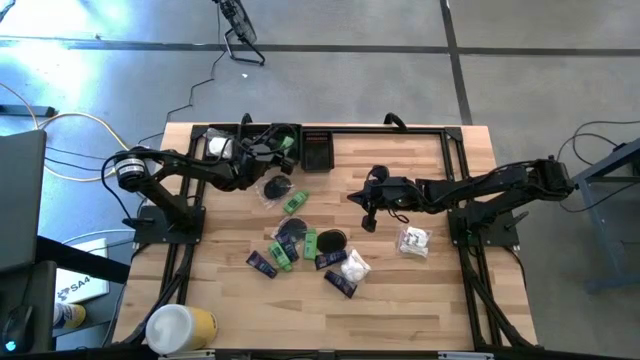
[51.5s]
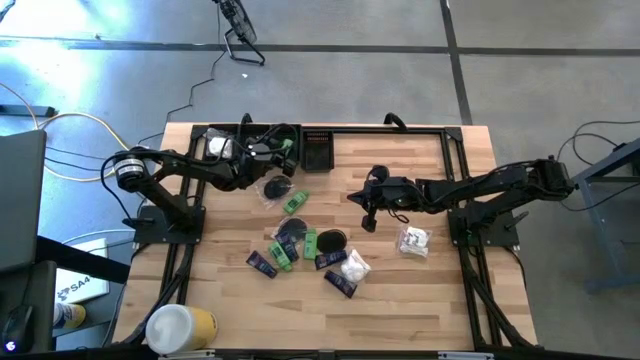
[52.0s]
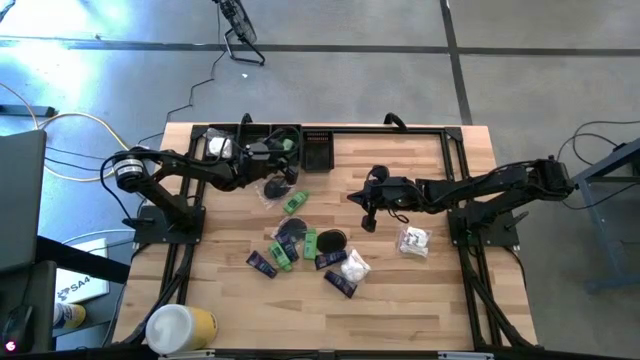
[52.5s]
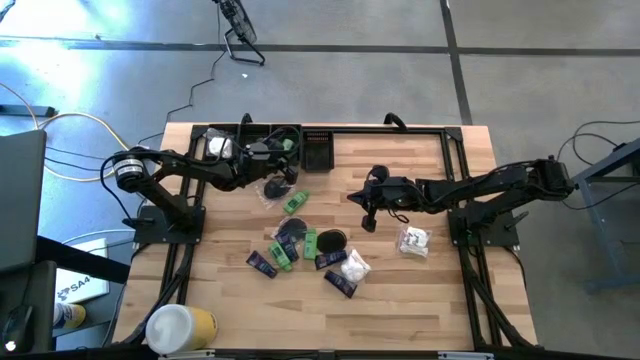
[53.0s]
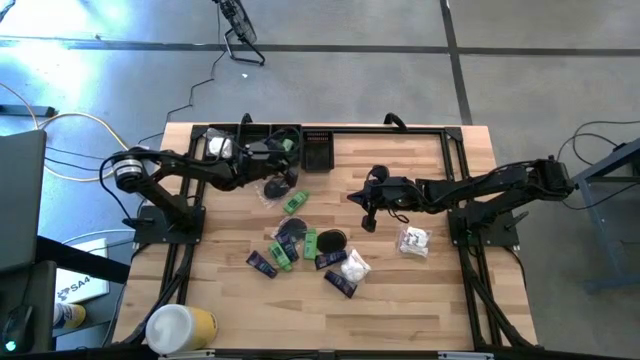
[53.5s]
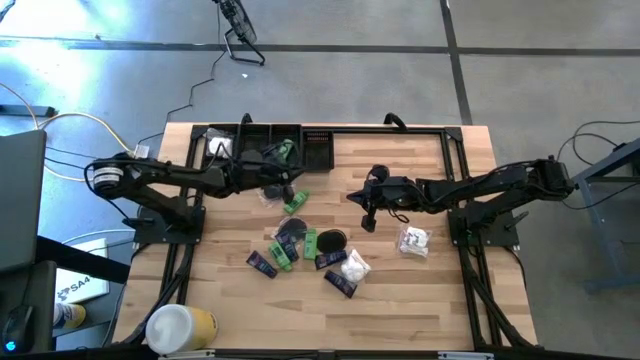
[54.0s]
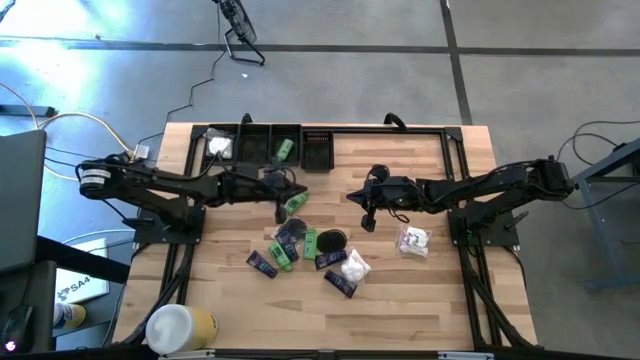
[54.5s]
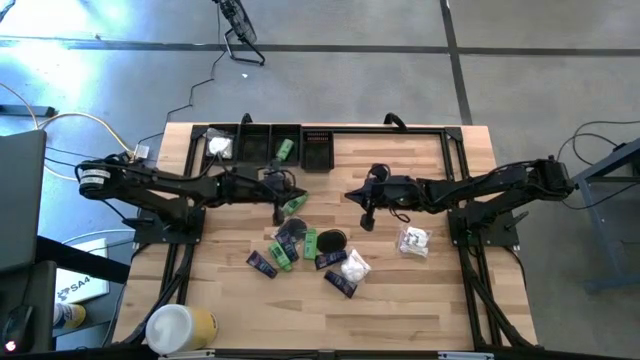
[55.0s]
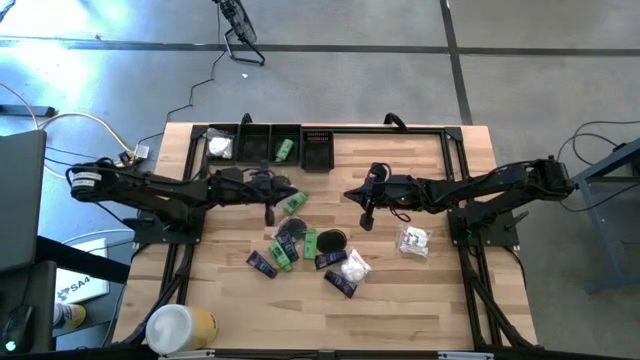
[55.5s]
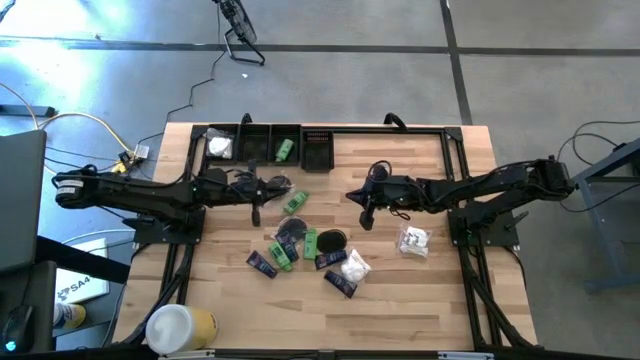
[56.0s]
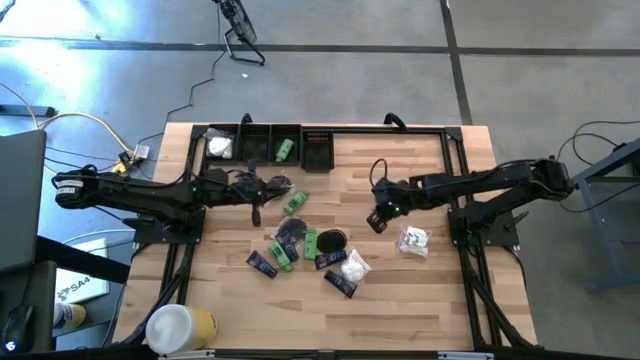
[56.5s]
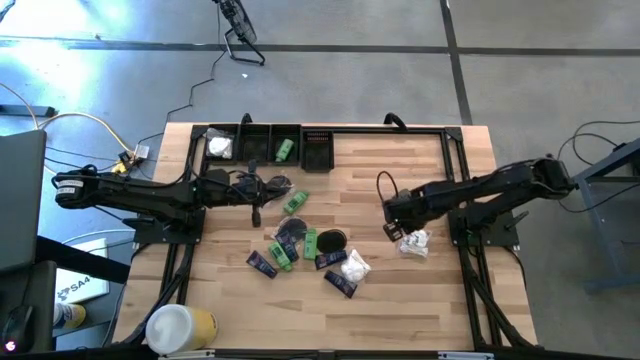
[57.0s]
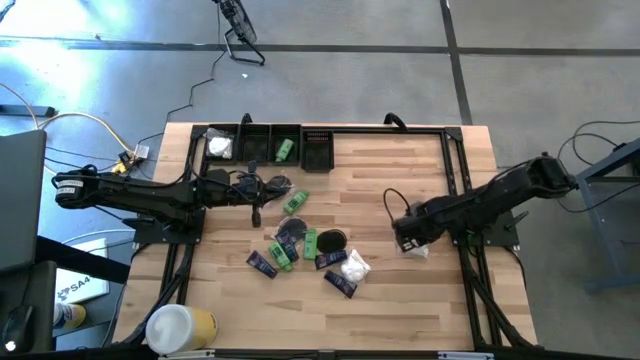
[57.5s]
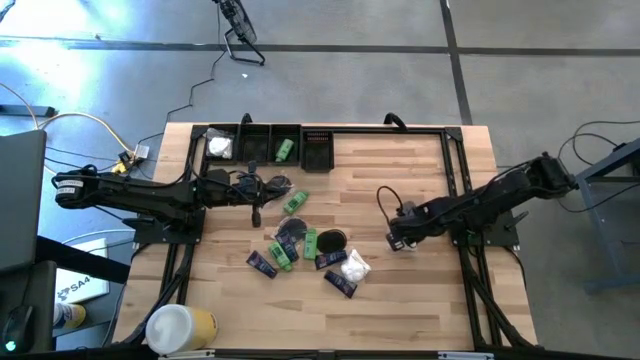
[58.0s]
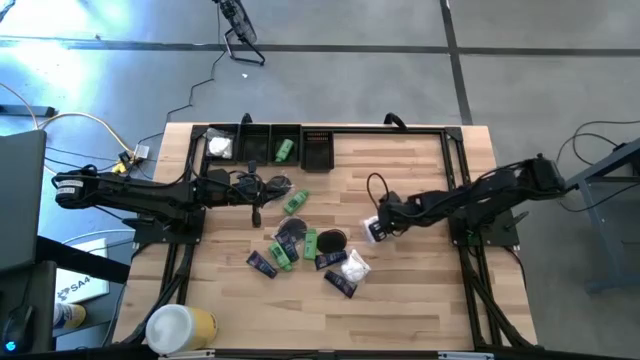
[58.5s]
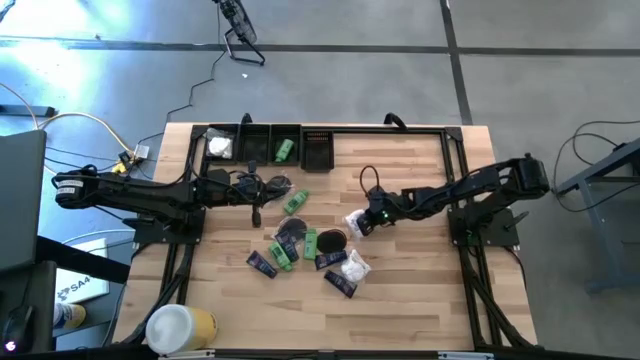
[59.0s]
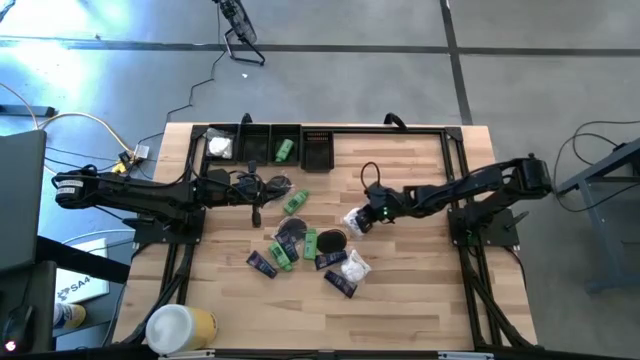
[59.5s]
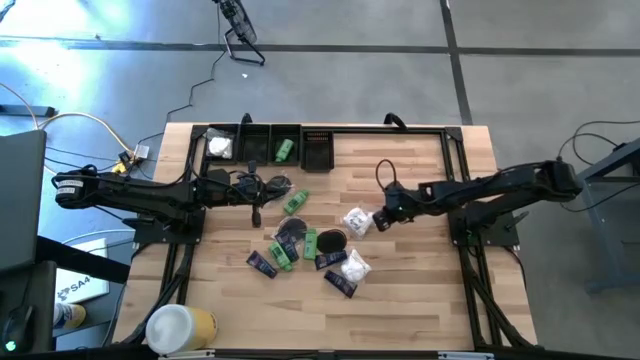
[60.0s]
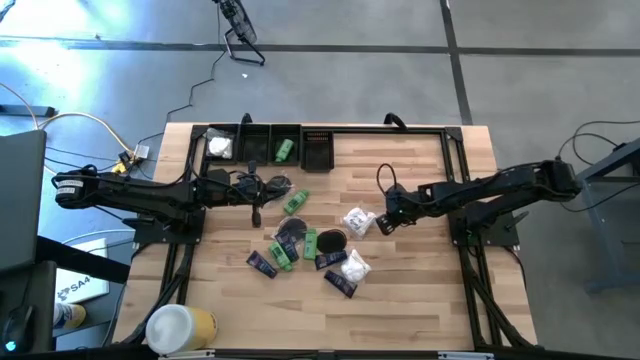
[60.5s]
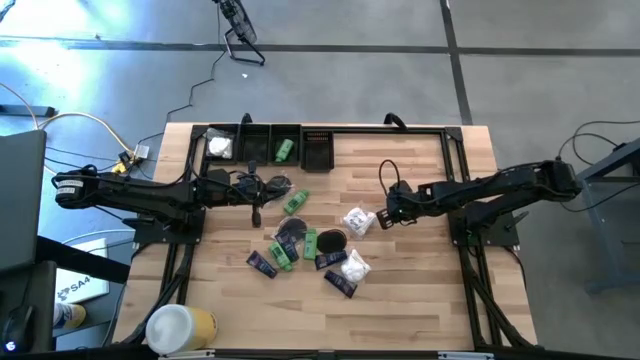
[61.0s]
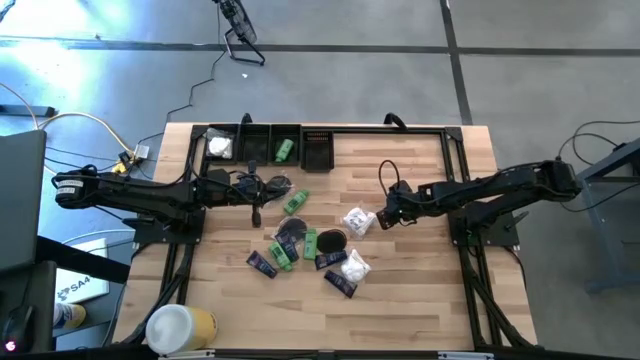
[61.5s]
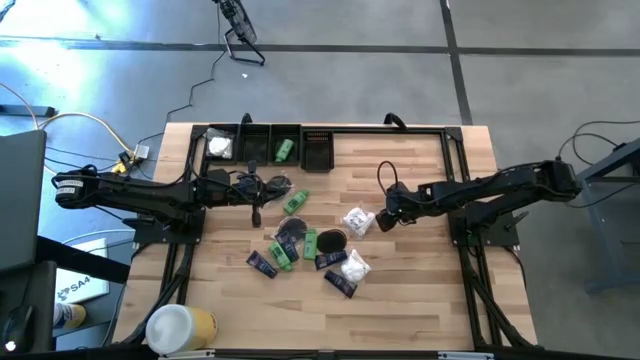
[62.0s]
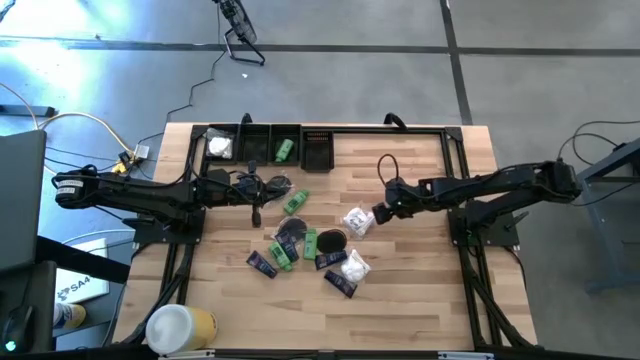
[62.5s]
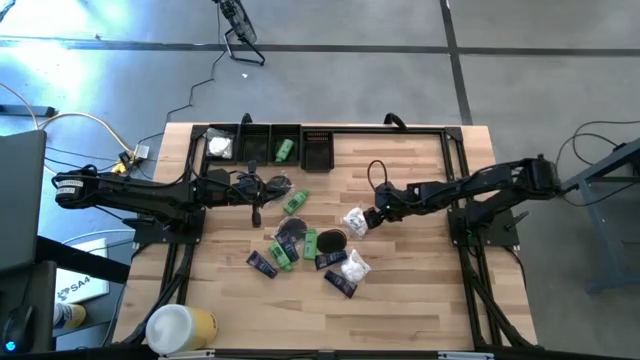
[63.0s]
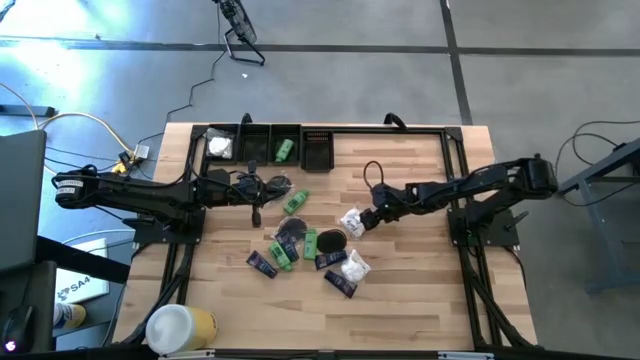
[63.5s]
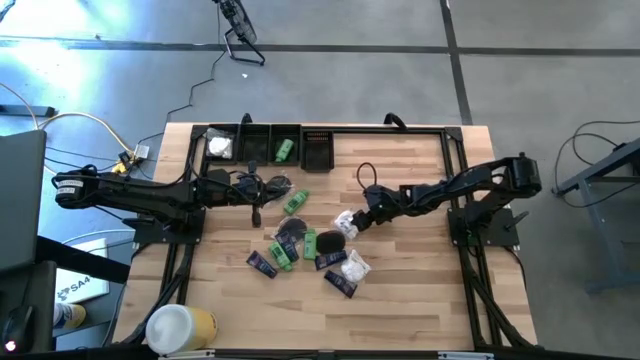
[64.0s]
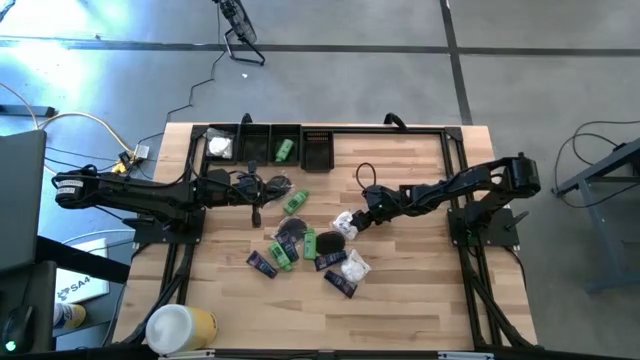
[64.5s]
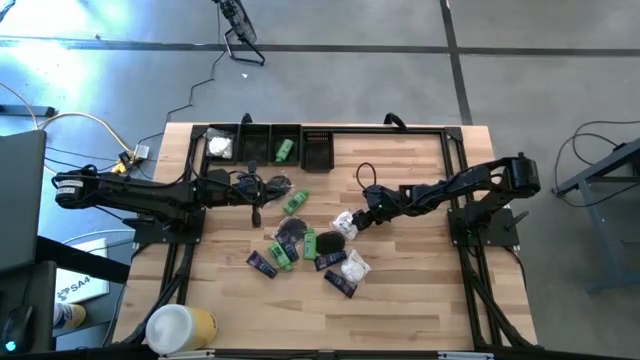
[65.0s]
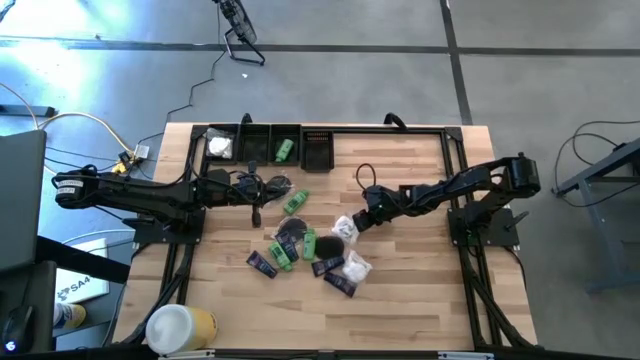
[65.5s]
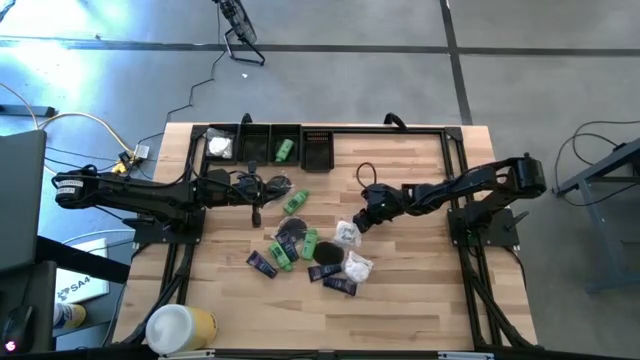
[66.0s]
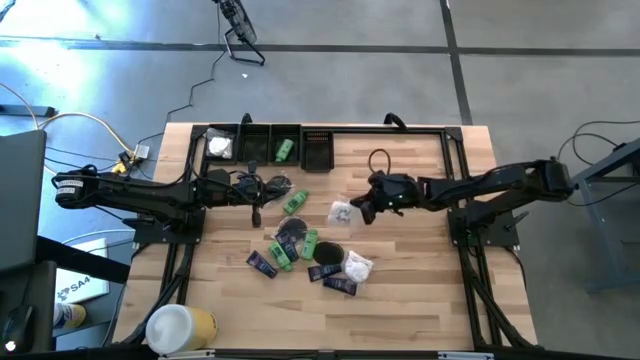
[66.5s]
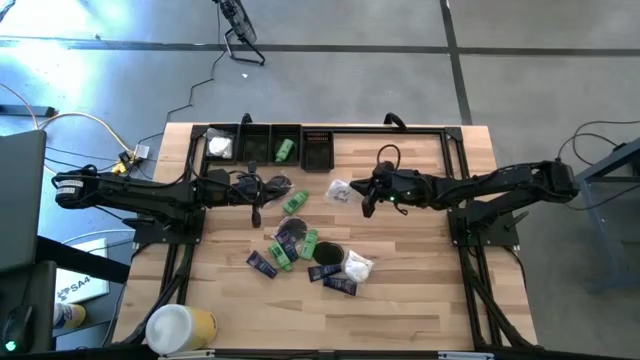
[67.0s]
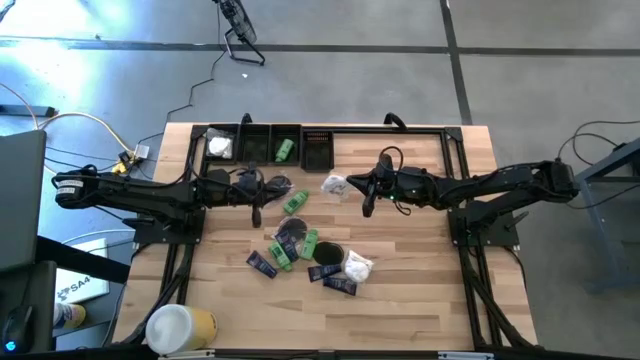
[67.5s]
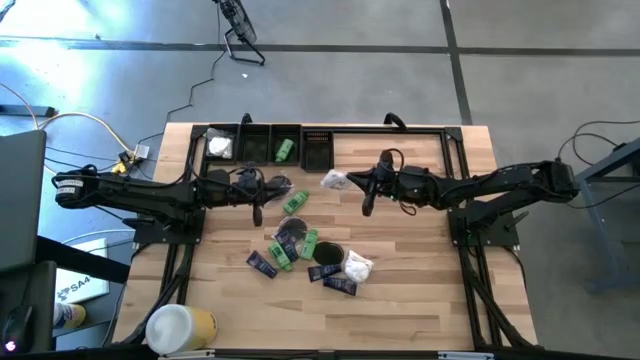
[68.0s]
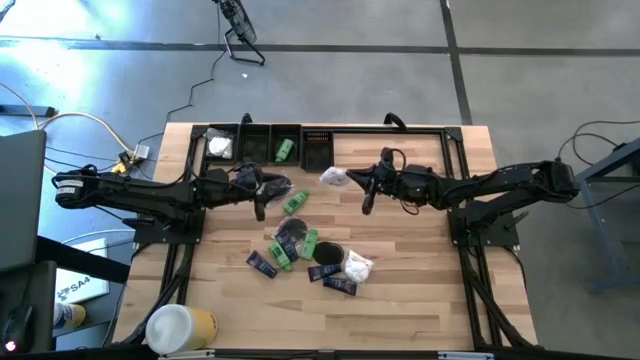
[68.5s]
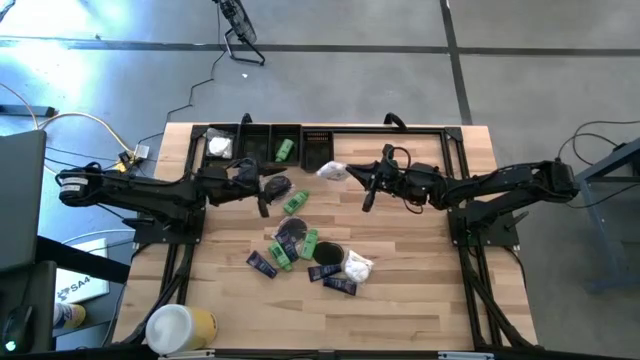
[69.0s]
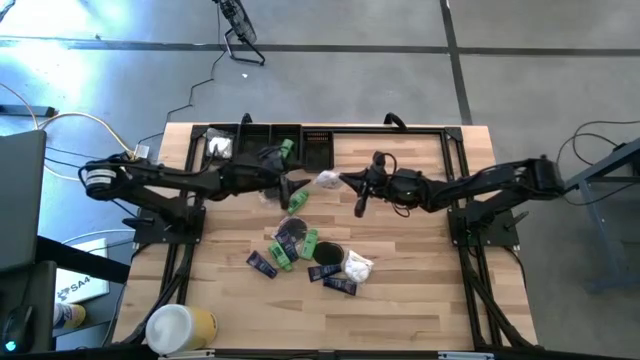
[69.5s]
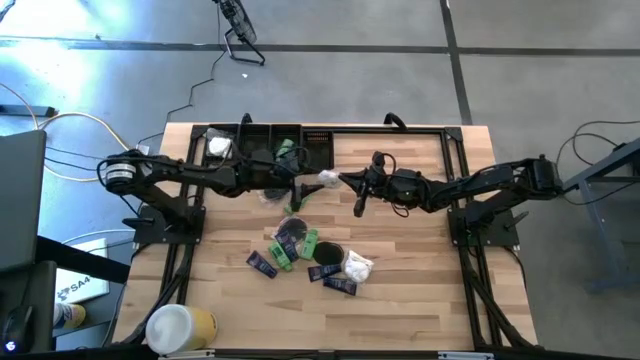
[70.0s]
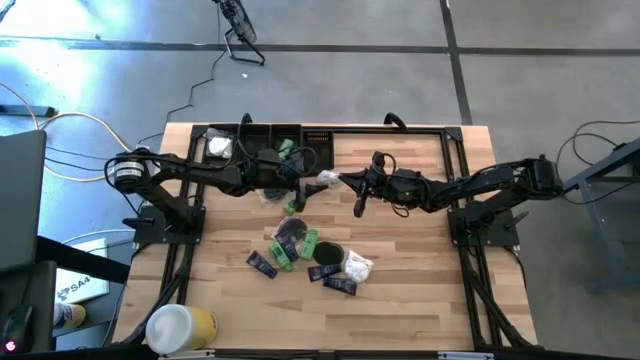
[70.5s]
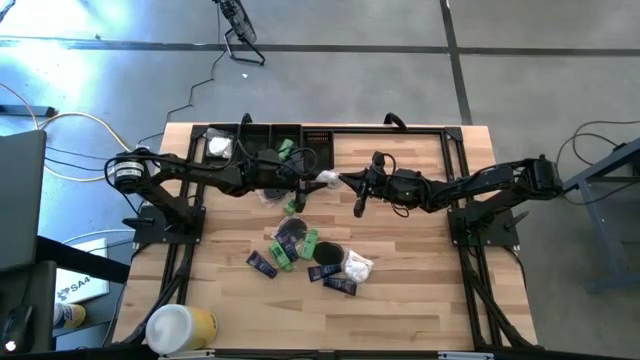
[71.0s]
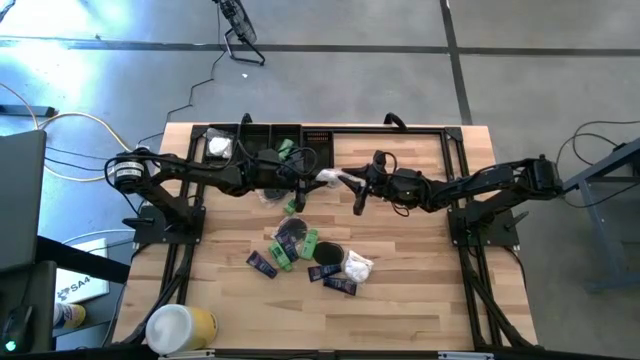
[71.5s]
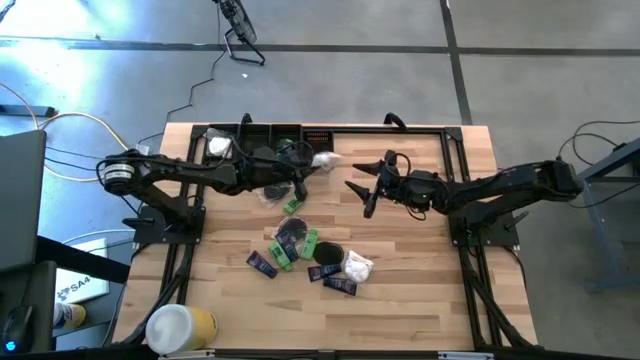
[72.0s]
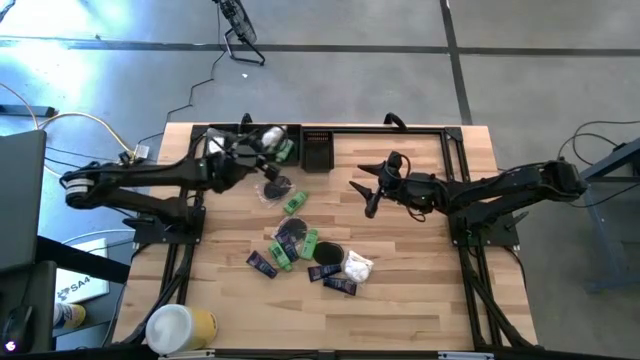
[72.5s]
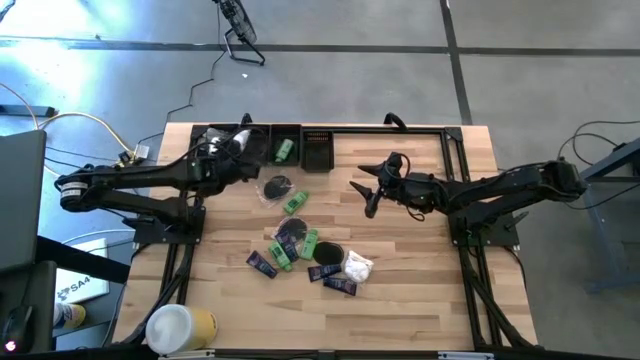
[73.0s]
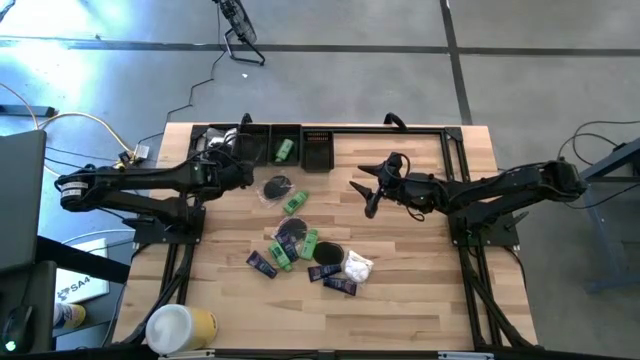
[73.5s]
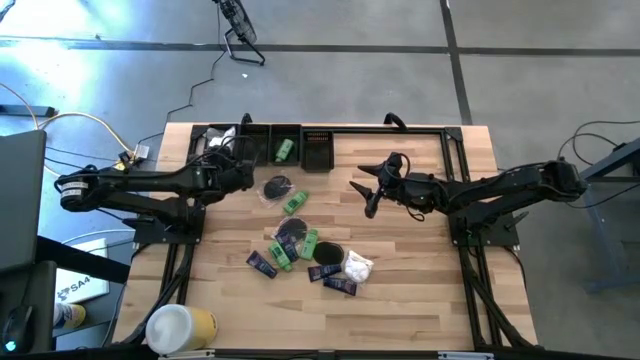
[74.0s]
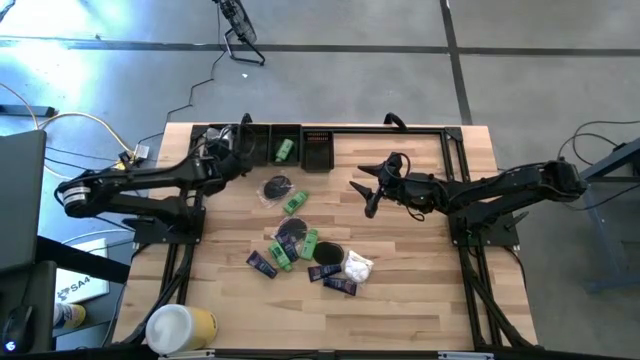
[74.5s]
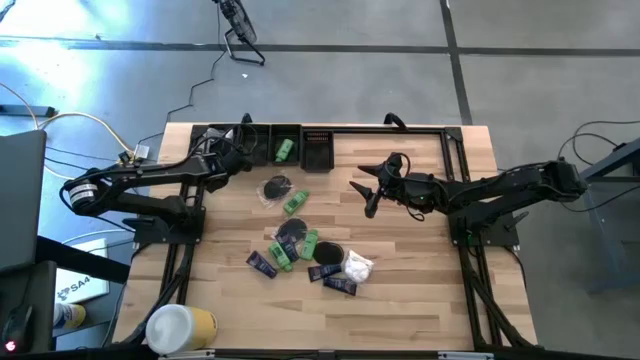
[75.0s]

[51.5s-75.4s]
Task: Pick & Place Travel size toiletries
Put the cotton pack into the left black bin
